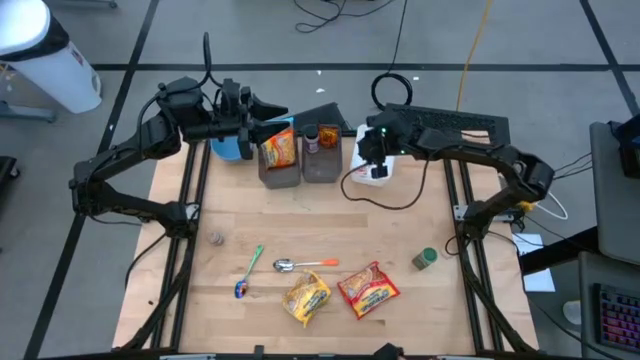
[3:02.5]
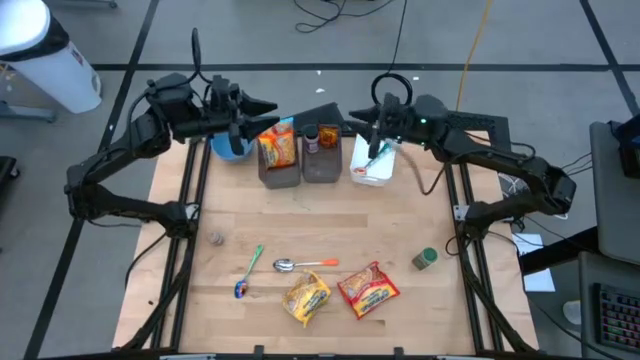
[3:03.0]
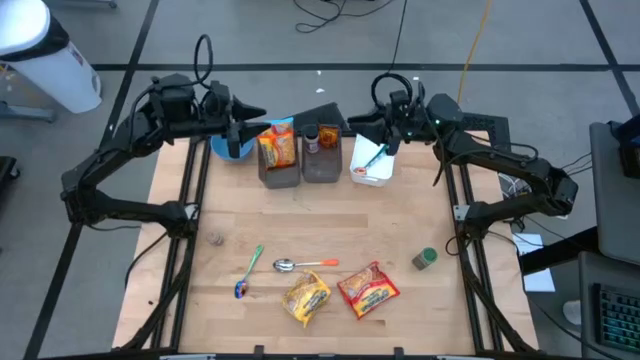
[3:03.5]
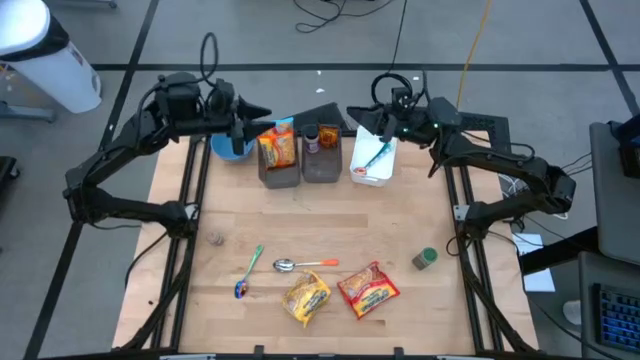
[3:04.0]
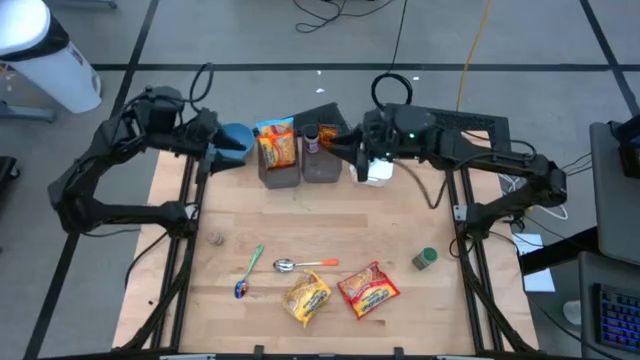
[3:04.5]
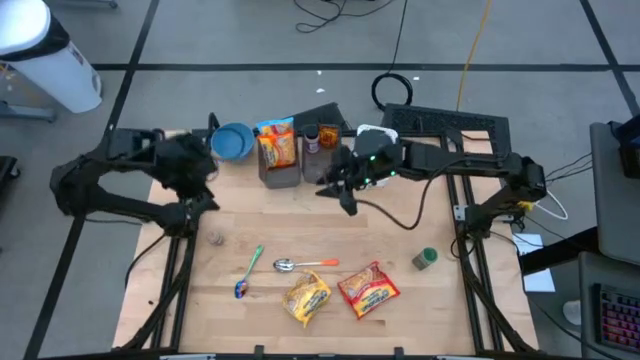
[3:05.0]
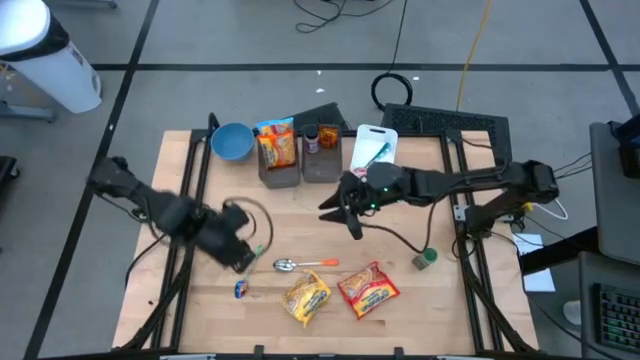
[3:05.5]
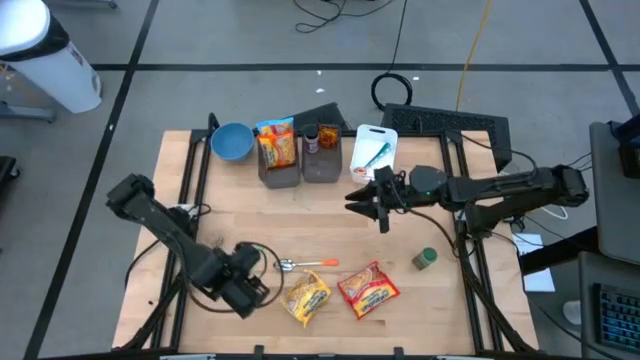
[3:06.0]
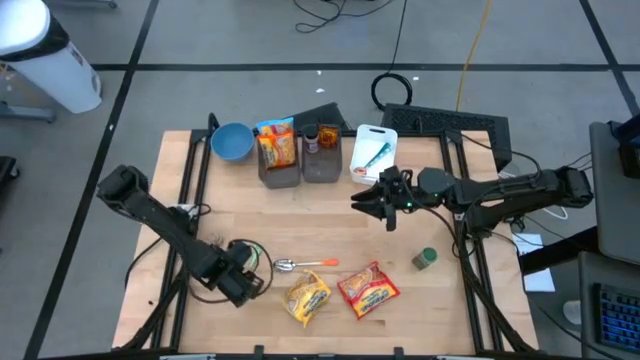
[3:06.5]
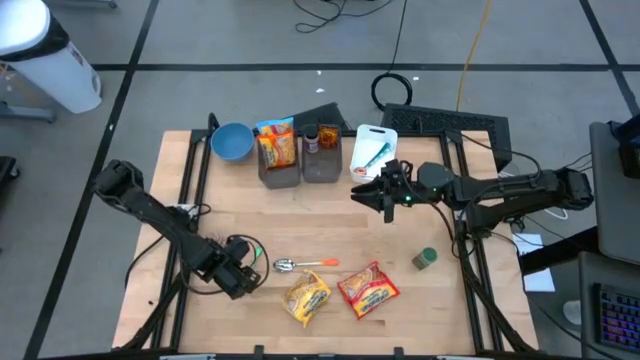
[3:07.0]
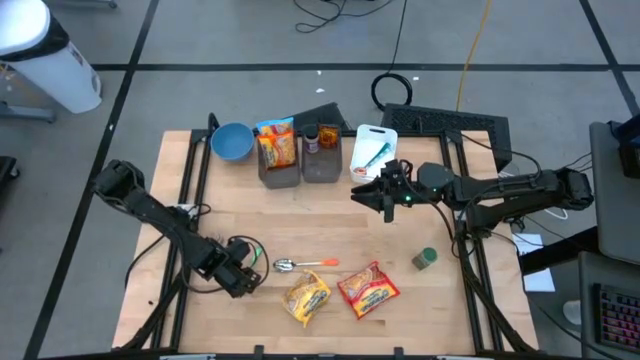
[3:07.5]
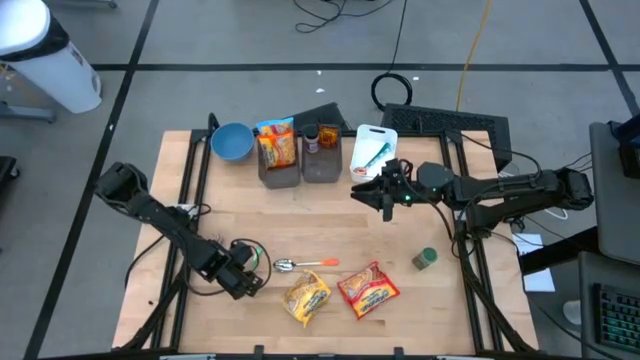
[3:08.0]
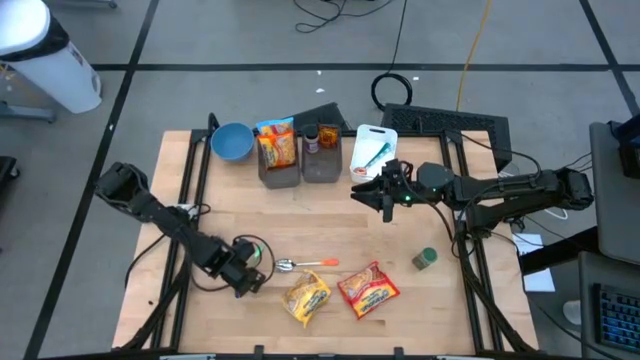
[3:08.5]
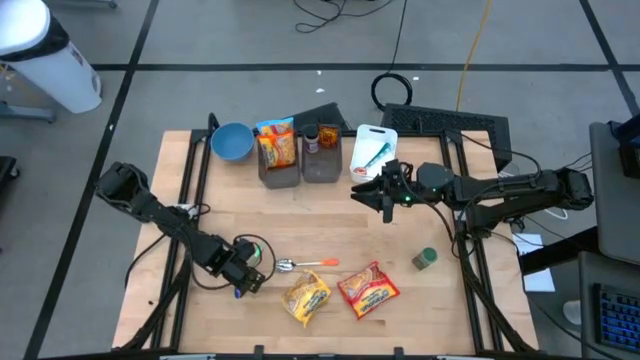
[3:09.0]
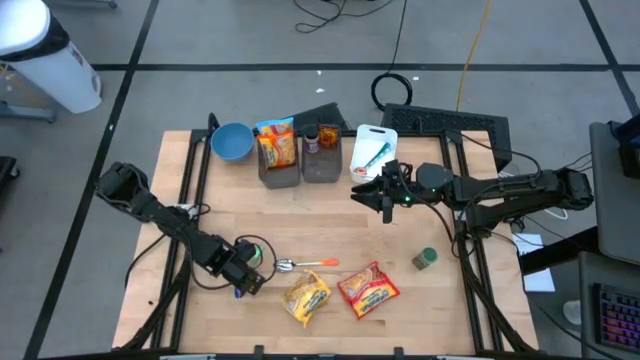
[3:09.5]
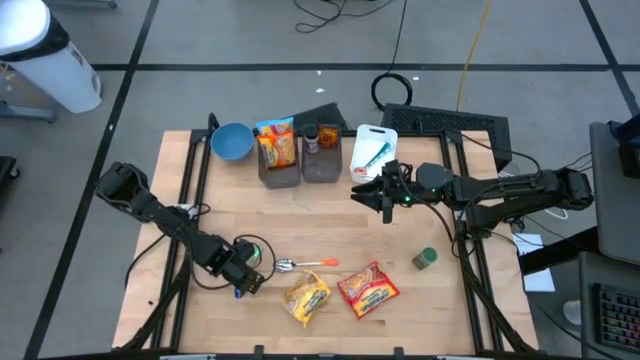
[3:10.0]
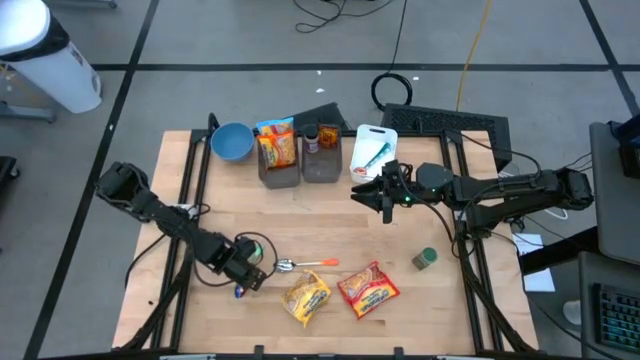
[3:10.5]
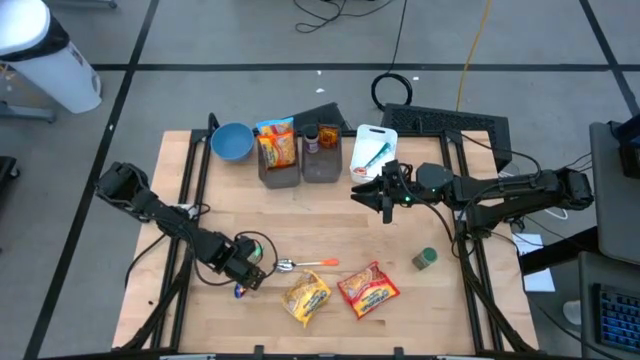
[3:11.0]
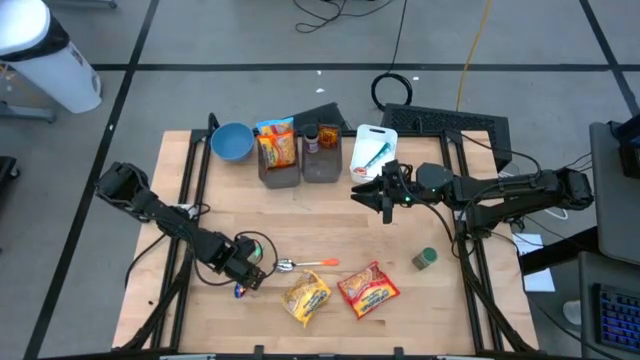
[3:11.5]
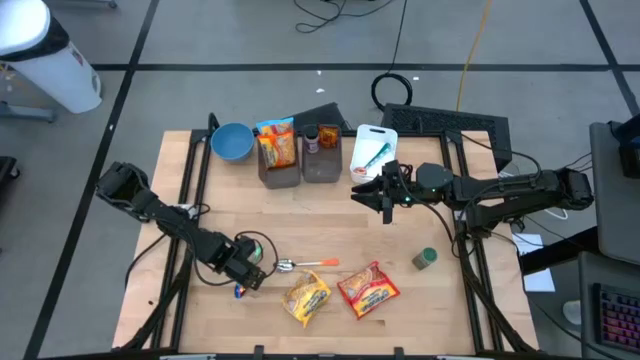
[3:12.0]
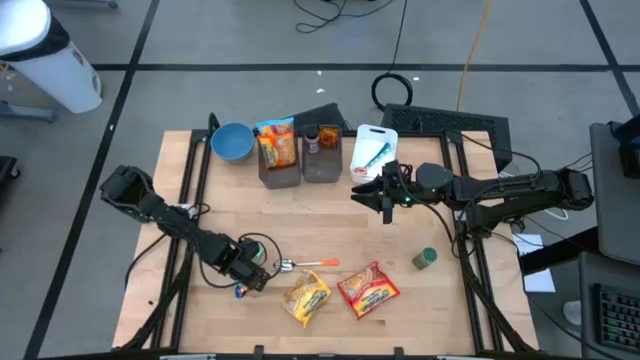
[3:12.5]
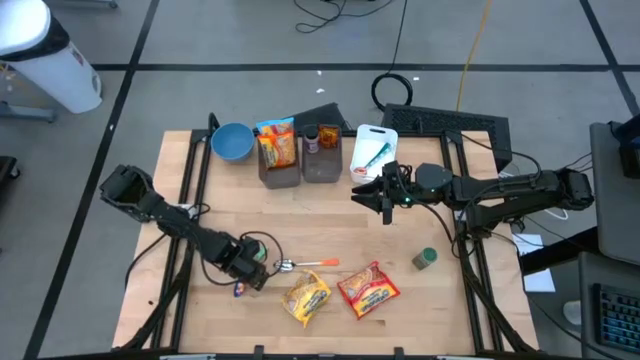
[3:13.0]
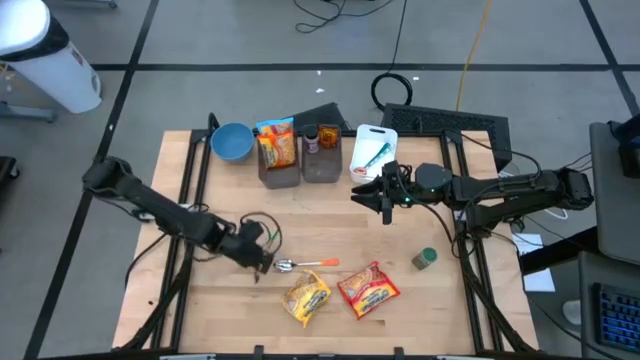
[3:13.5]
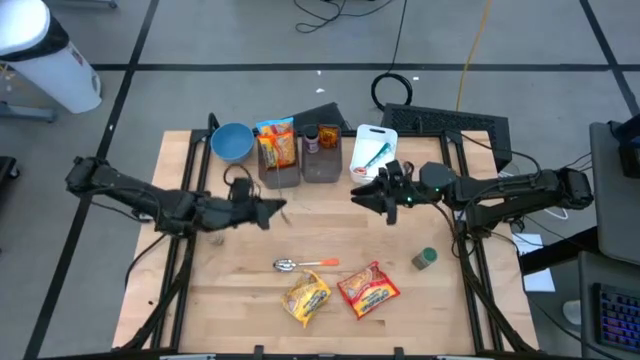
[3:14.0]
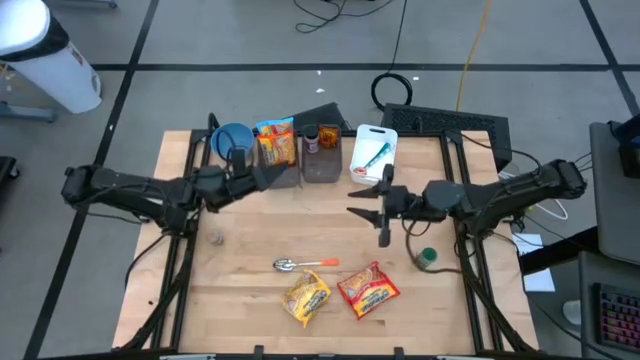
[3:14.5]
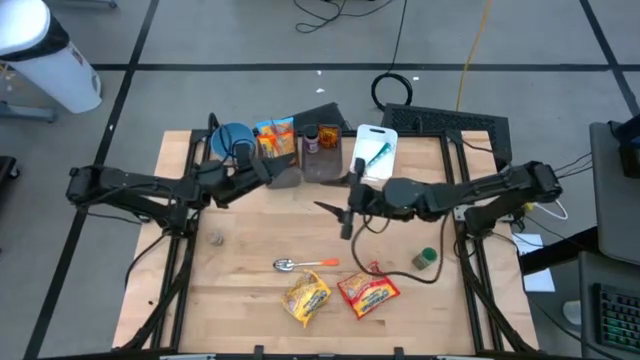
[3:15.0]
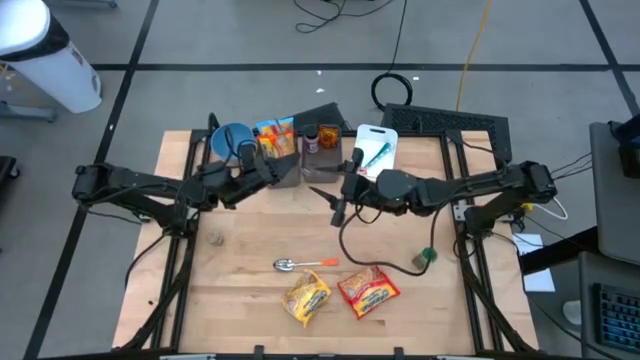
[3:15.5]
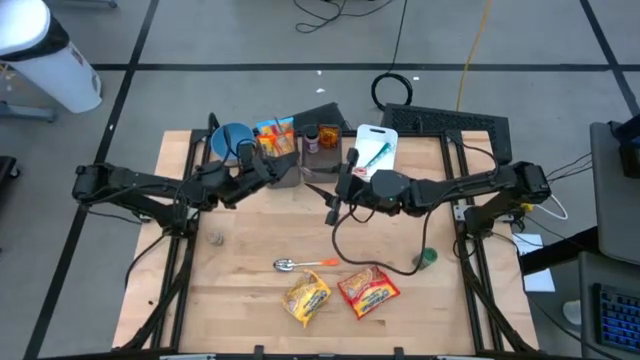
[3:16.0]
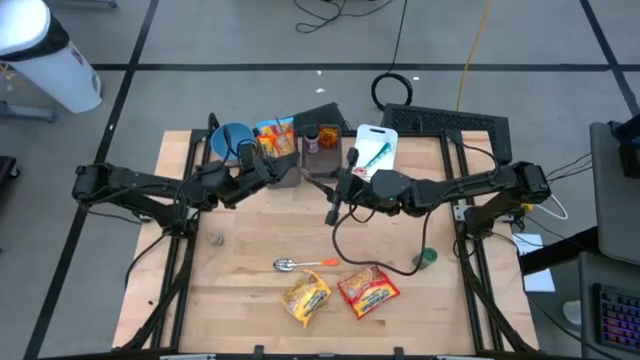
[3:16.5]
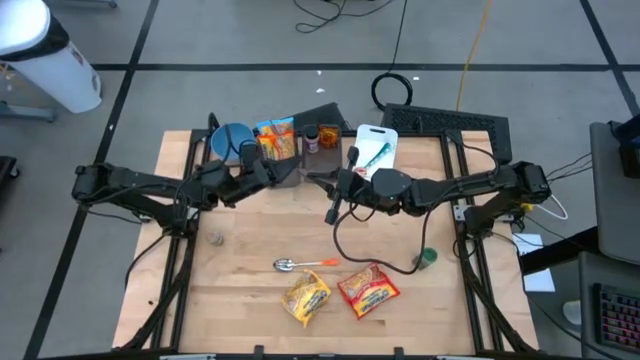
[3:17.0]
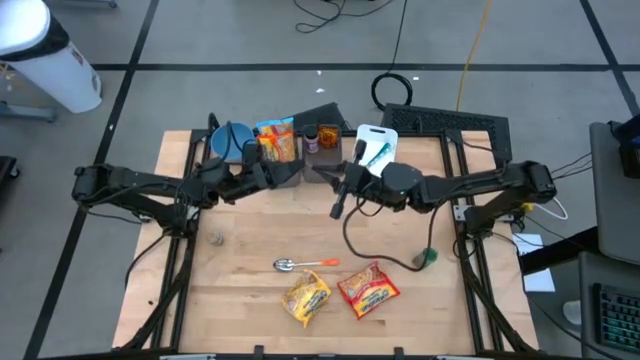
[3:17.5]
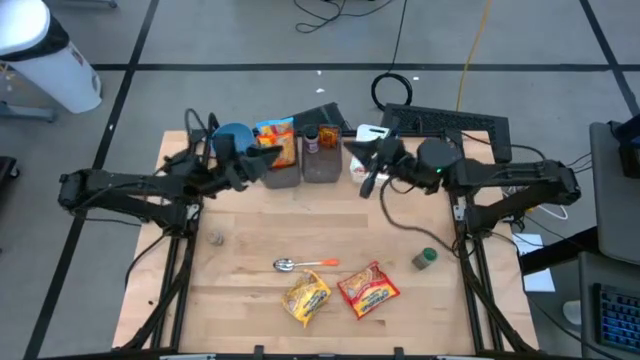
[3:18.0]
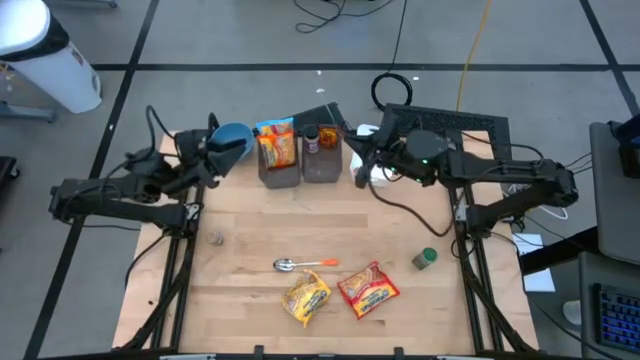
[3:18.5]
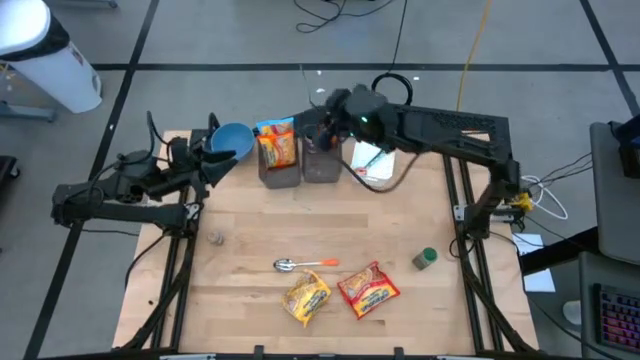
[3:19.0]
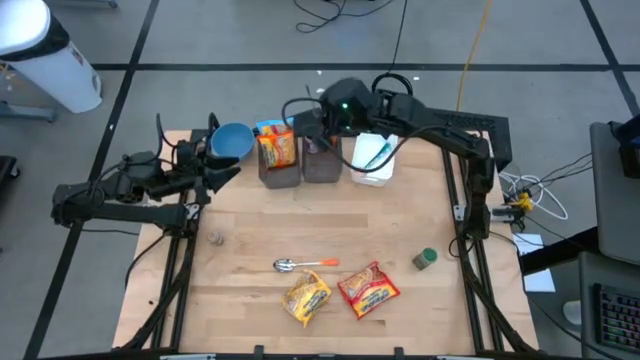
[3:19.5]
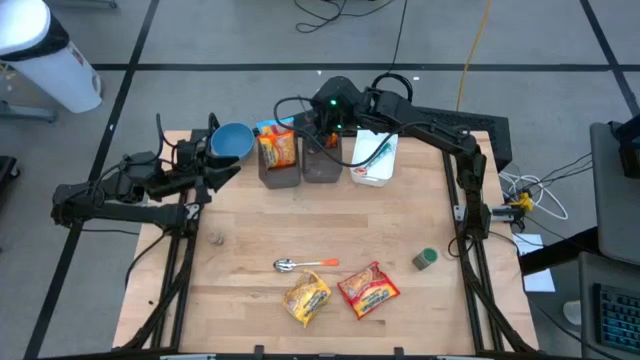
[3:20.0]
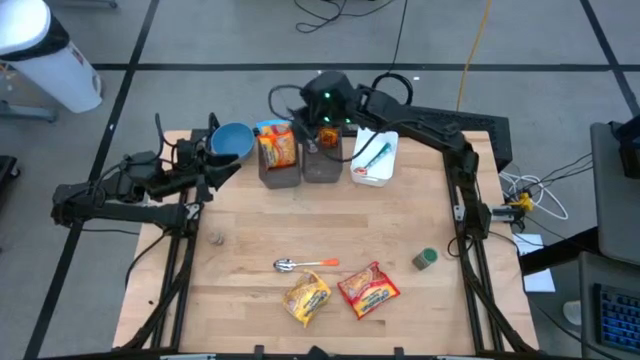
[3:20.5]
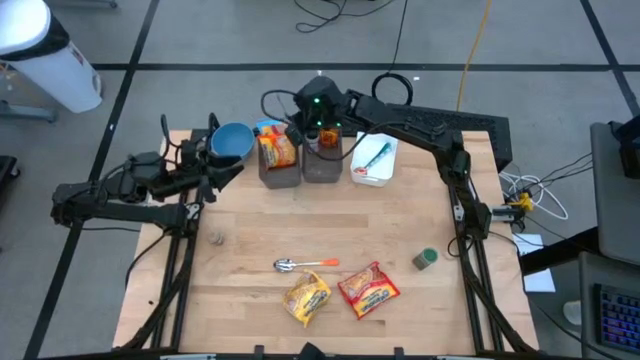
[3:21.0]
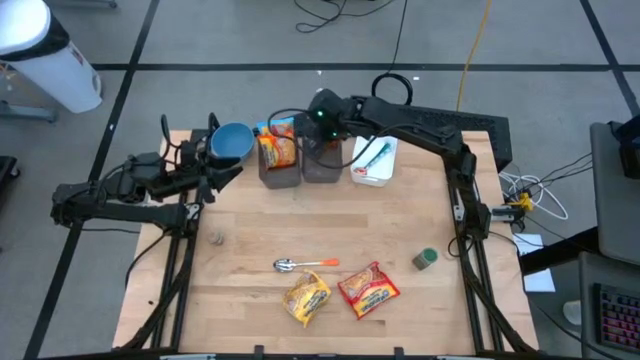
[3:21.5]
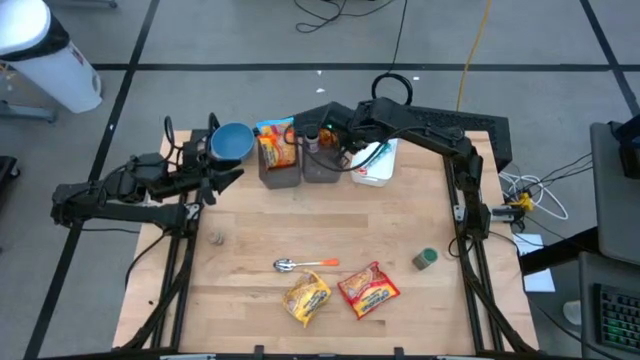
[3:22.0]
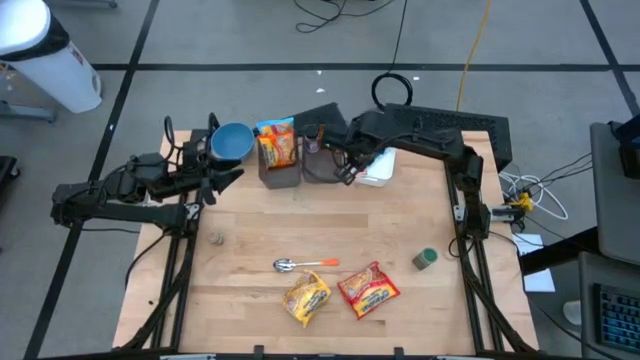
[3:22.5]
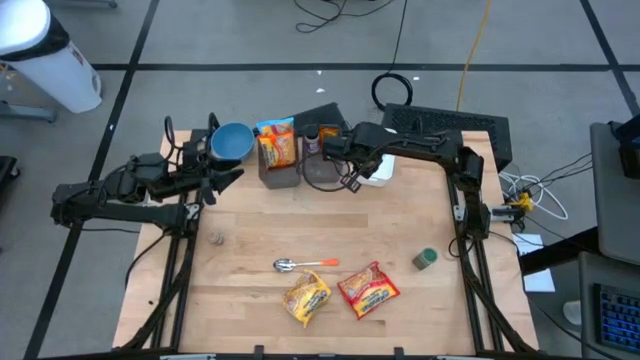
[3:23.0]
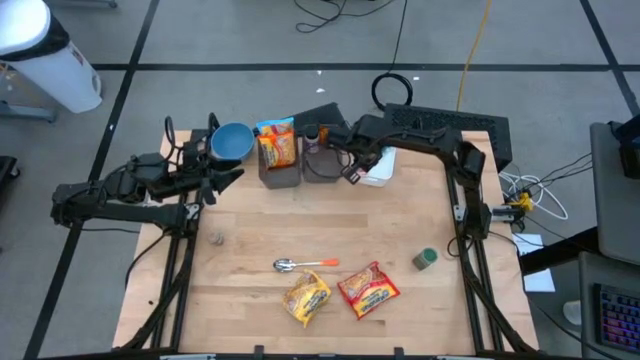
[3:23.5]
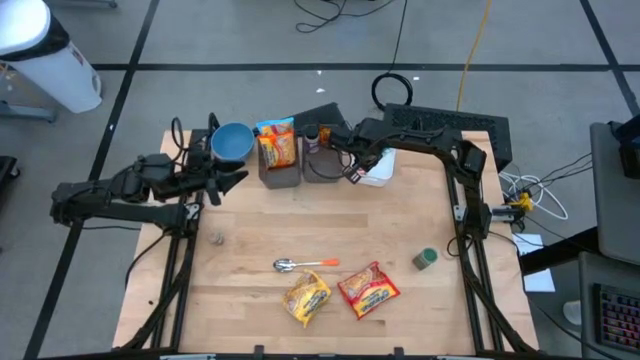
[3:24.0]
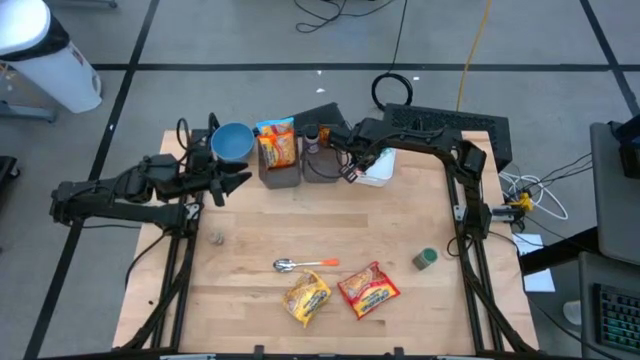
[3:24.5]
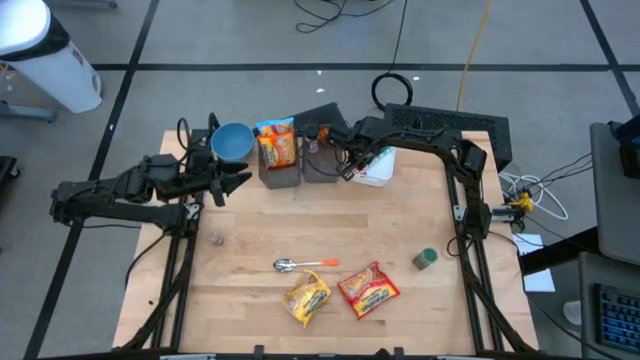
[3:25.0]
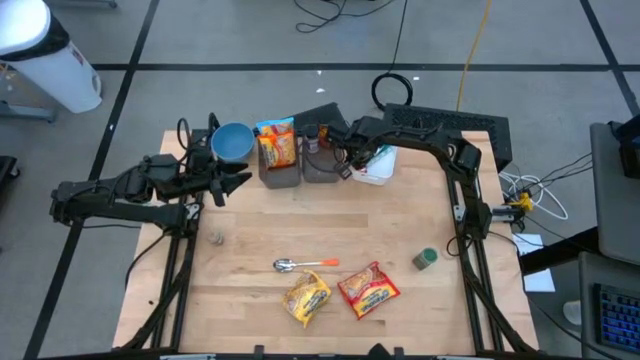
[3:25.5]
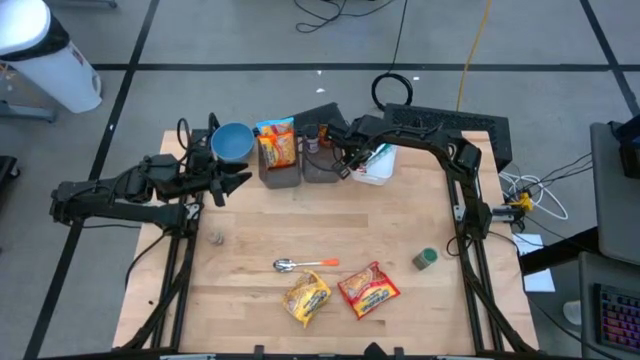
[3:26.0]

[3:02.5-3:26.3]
Task: Pick & Place Food Item
Put the blue green spoon into the white bin
